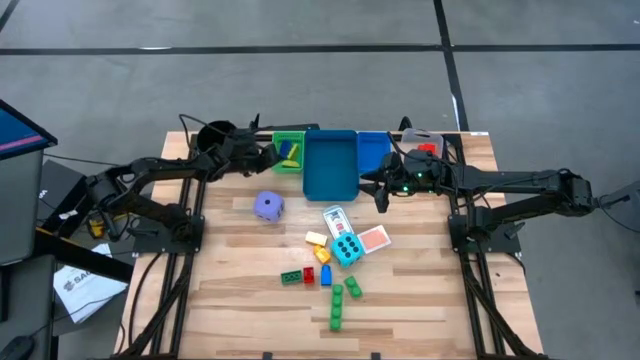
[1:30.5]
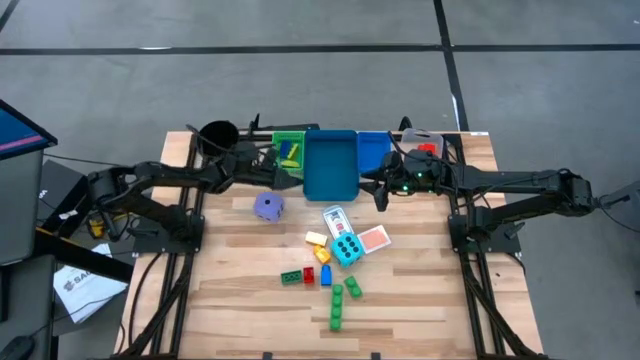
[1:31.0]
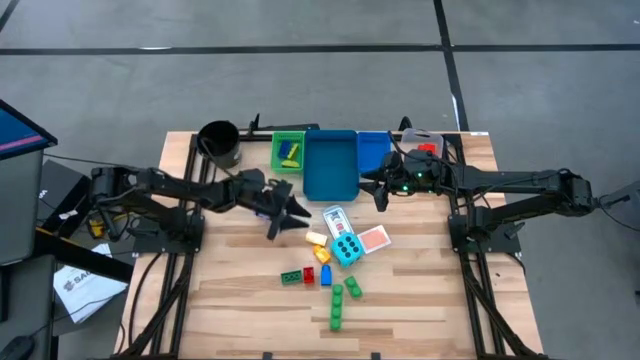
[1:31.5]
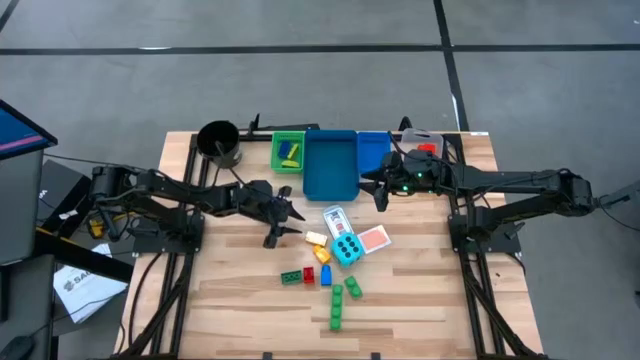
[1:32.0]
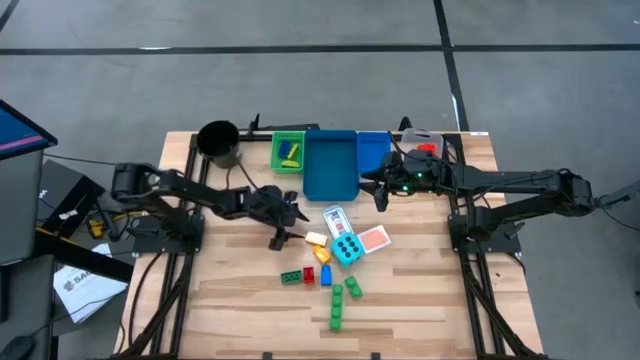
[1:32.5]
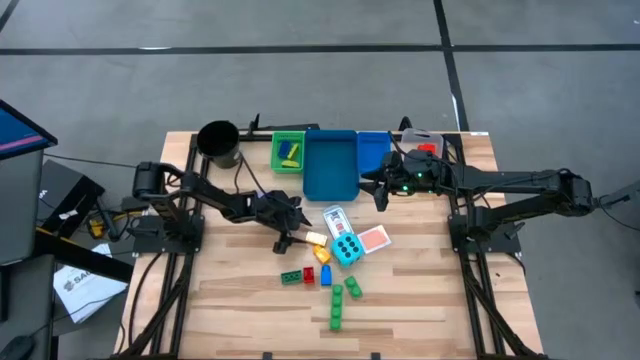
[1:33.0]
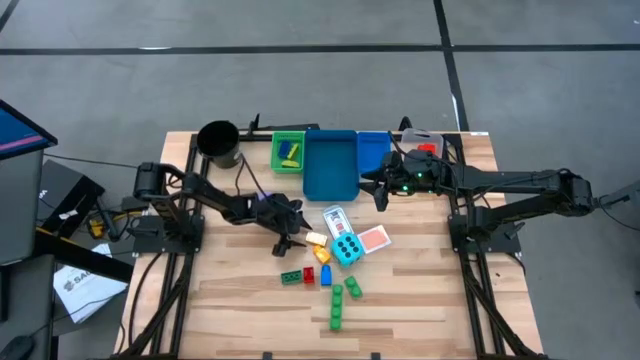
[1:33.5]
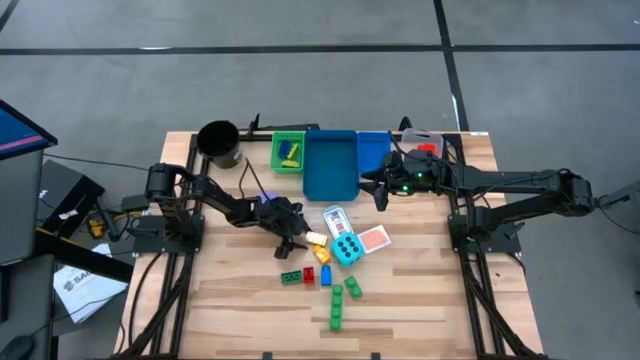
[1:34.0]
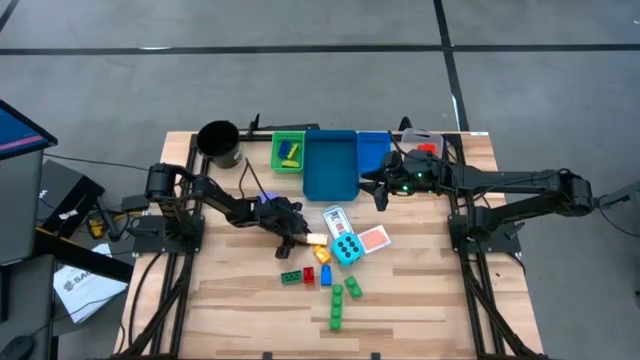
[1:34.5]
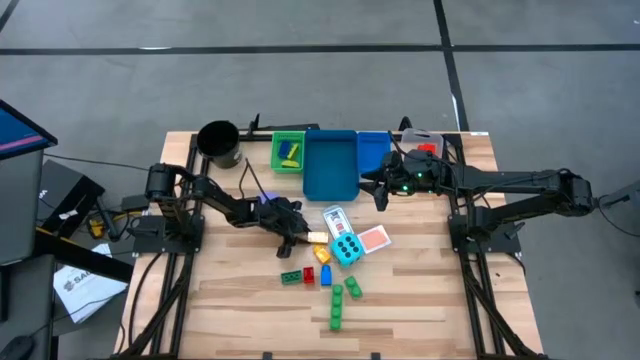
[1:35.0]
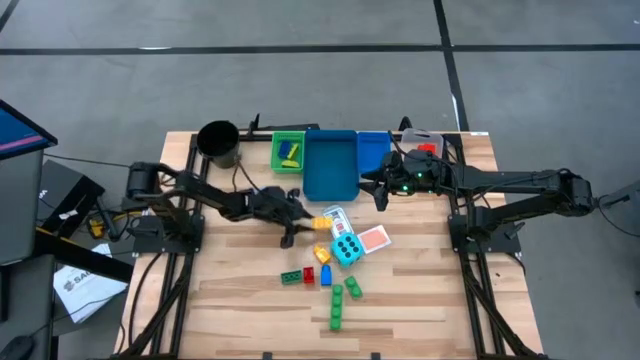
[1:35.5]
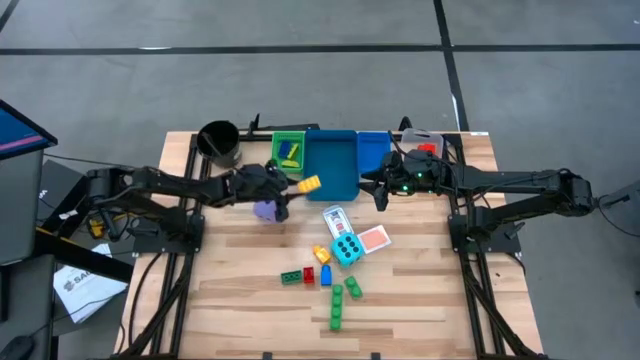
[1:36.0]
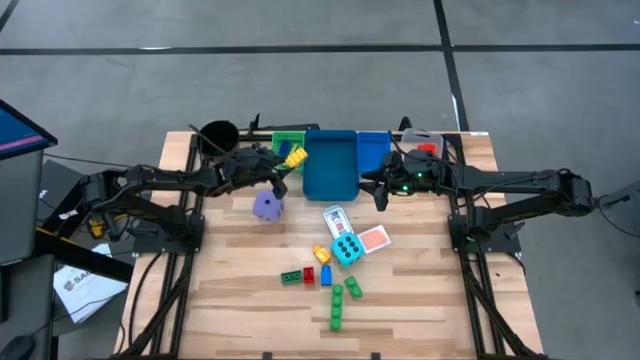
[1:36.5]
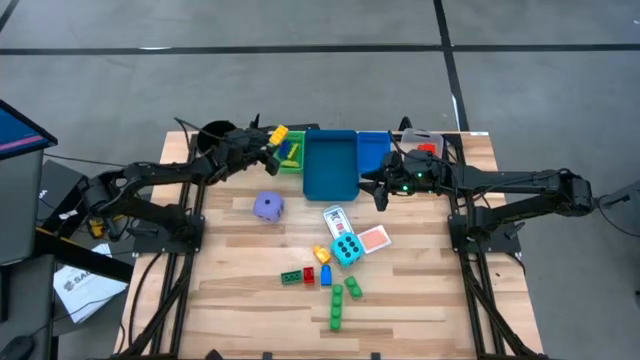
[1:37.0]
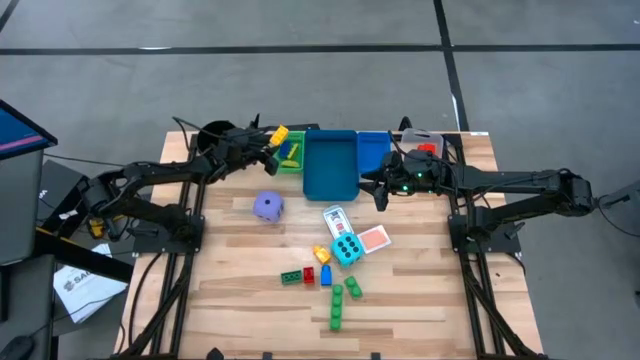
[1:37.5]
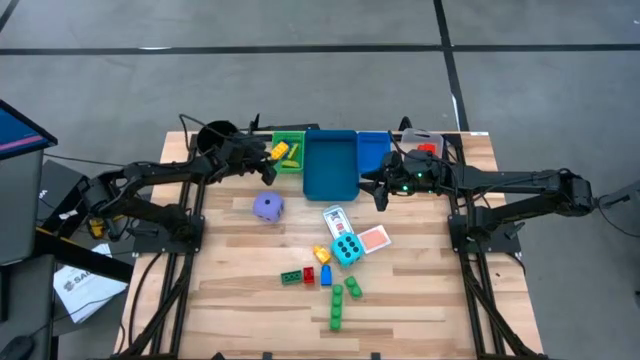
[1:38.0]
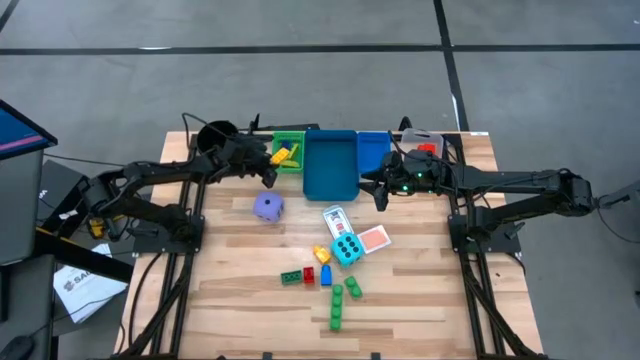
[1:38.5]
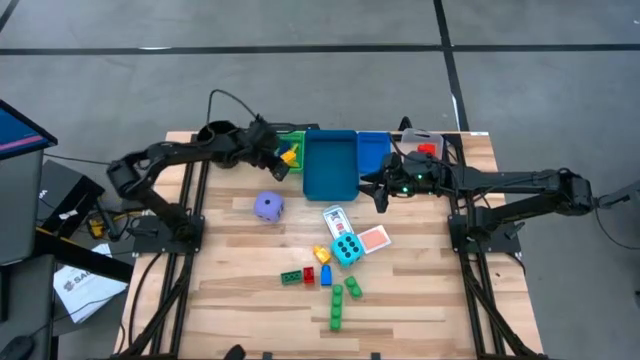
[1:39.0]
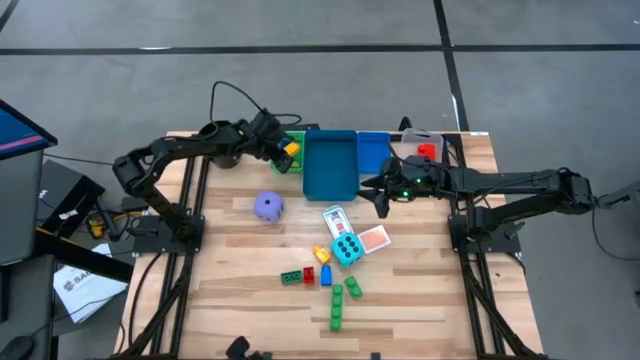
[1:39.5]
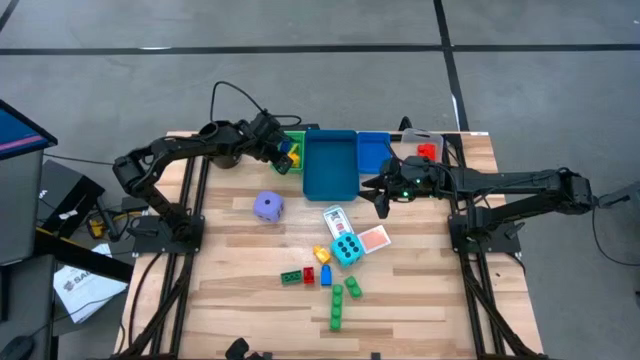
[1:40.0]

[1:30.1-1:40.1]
Task: Pick & Place Toys
Put the small yellow game piece into the green bin

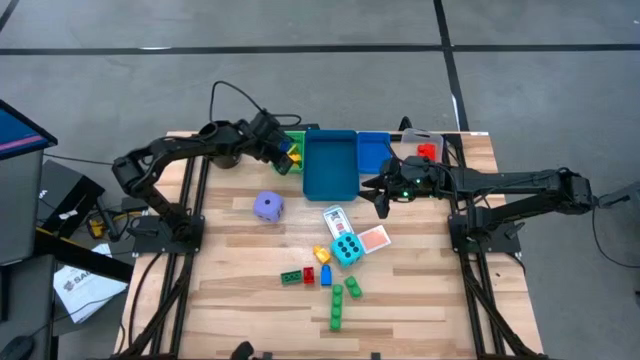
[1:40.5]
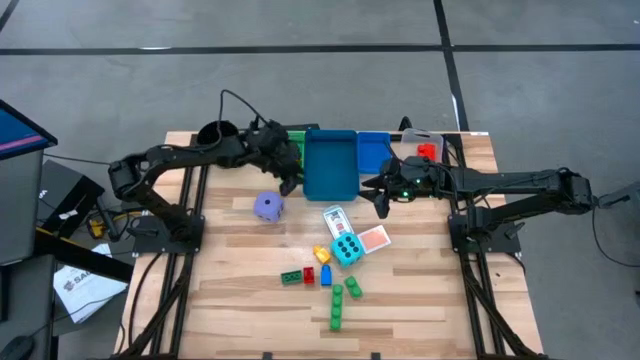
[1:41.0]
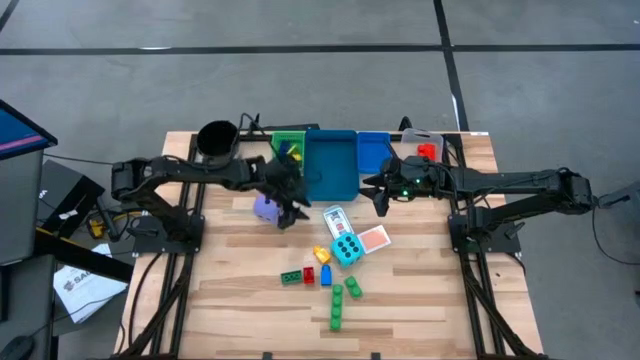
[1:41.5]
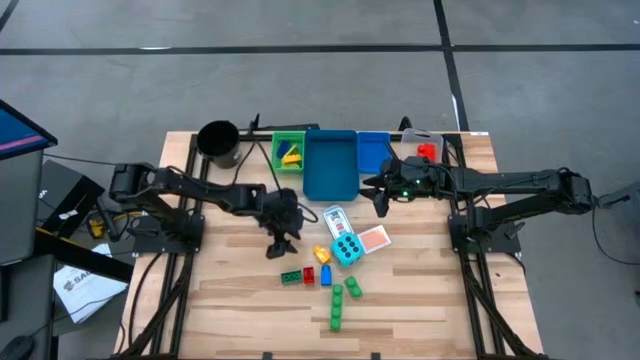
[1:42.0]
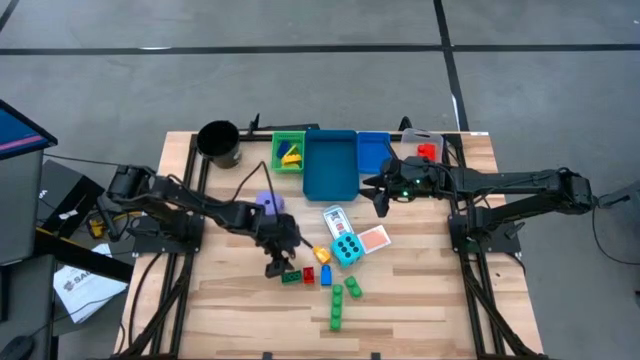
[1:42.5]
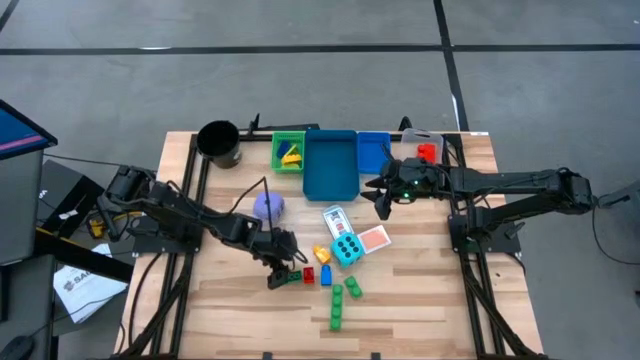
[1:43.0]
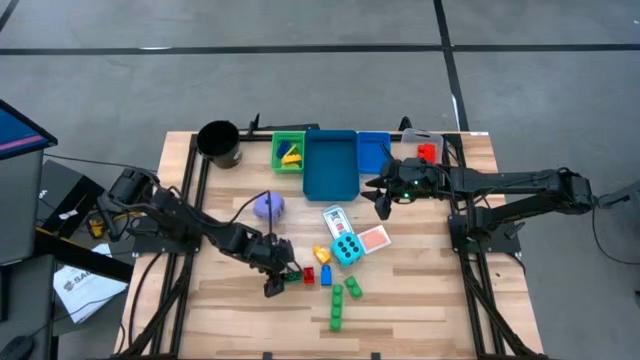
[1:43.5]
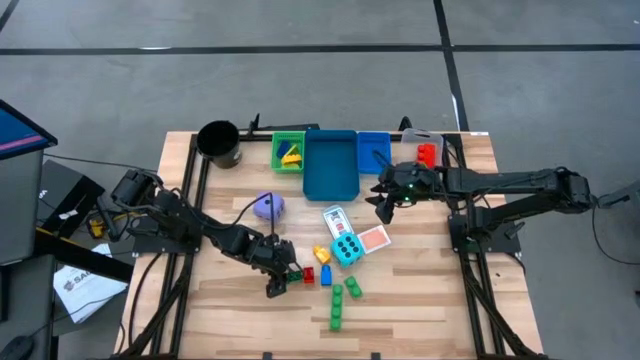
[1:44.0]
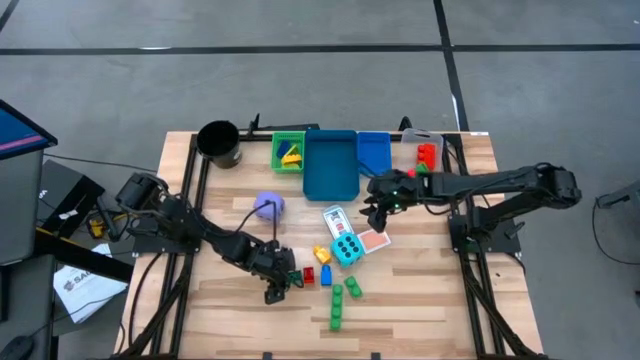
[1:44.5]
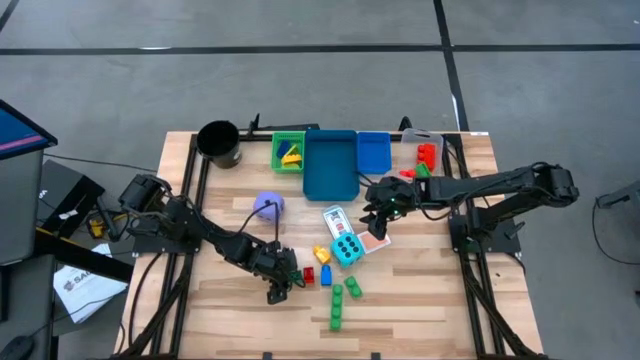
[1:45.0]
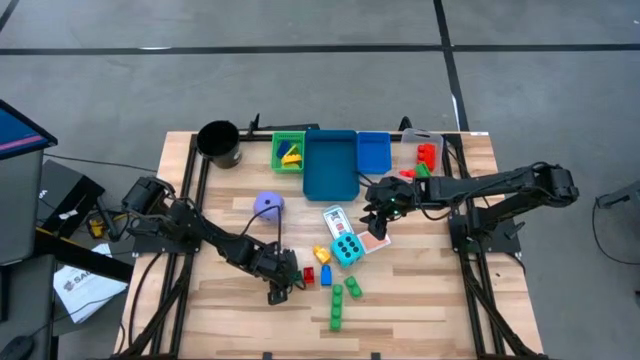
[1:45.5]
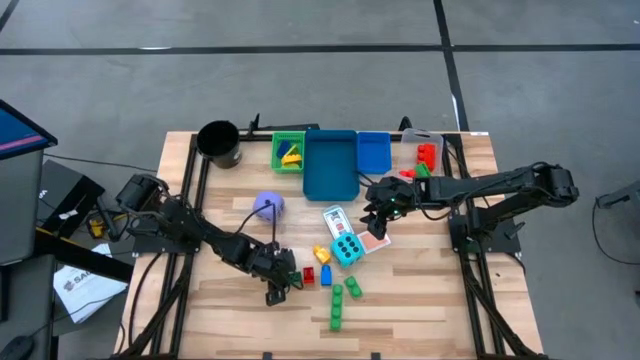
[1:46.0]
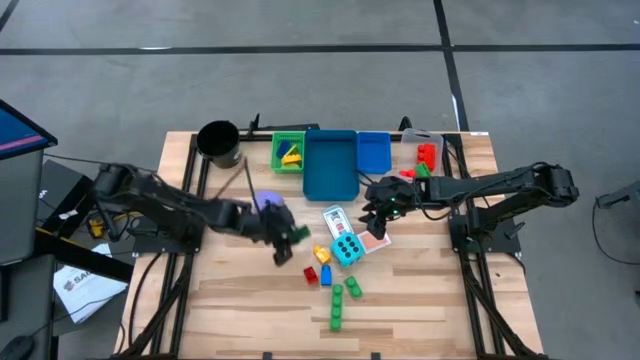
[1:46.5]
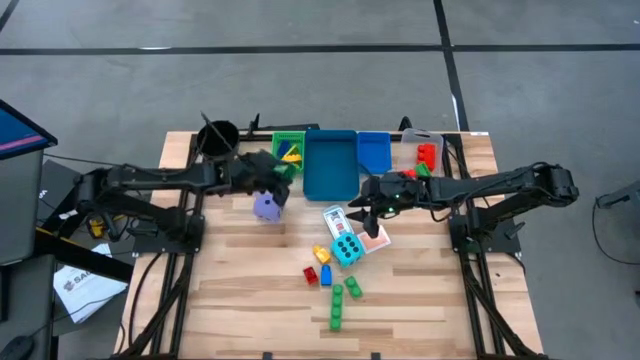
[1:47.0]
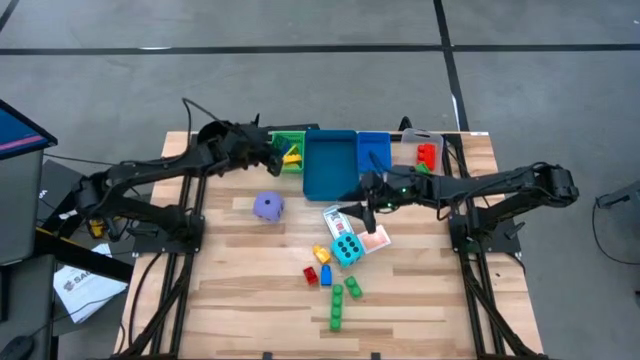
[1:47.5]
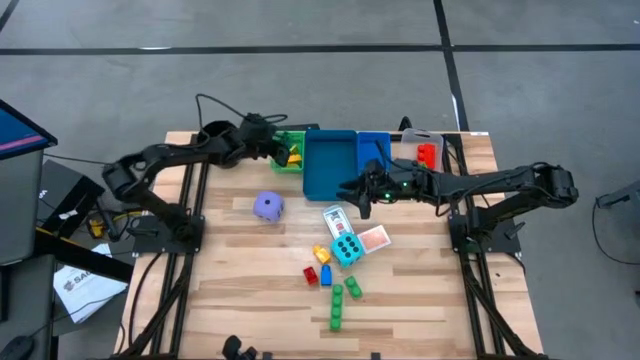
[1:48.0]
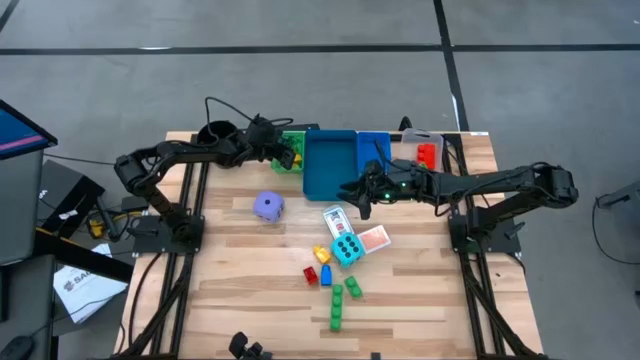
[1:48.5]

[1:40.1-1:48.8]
Put the small green game piece into the green bin

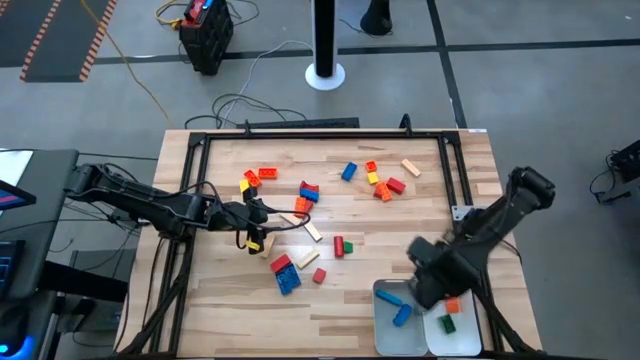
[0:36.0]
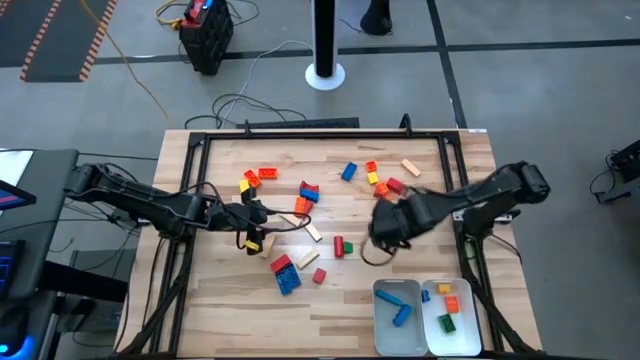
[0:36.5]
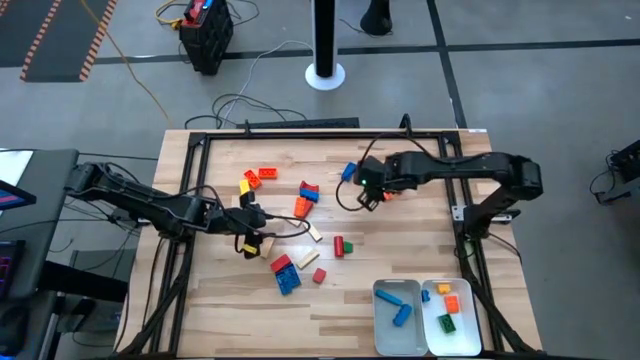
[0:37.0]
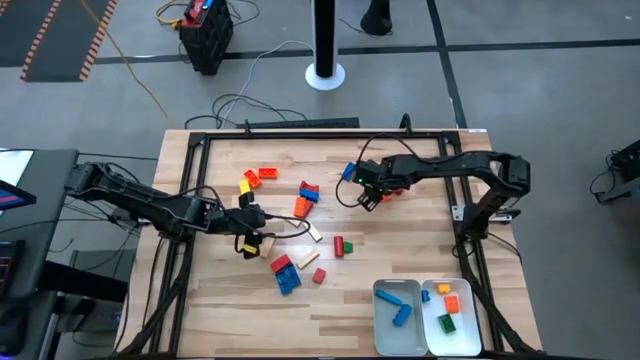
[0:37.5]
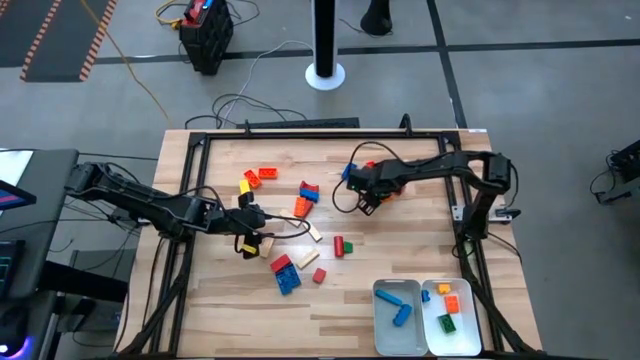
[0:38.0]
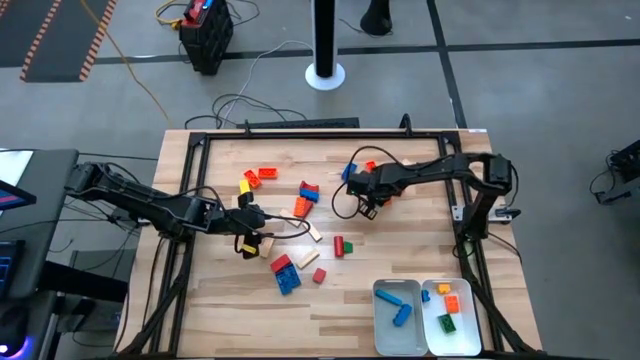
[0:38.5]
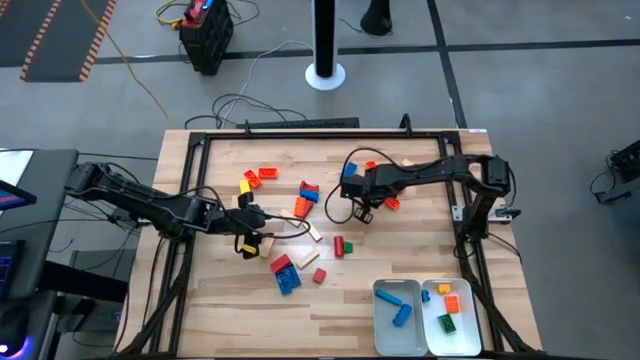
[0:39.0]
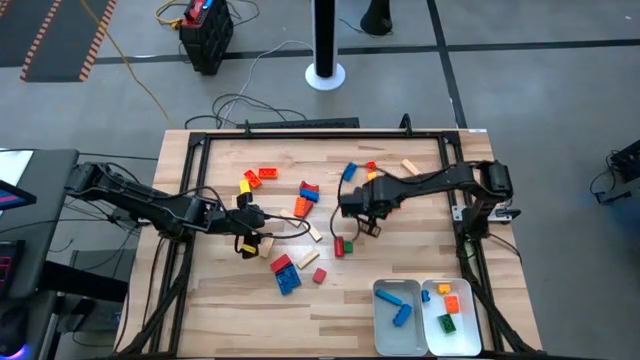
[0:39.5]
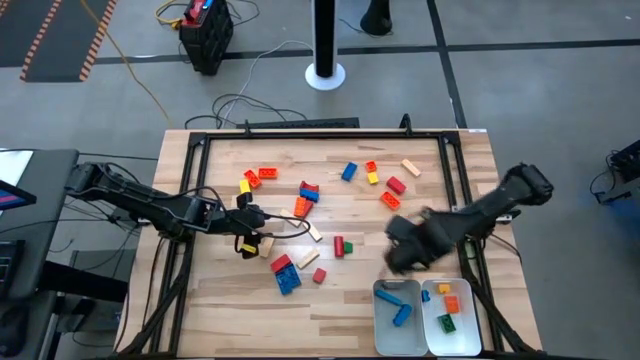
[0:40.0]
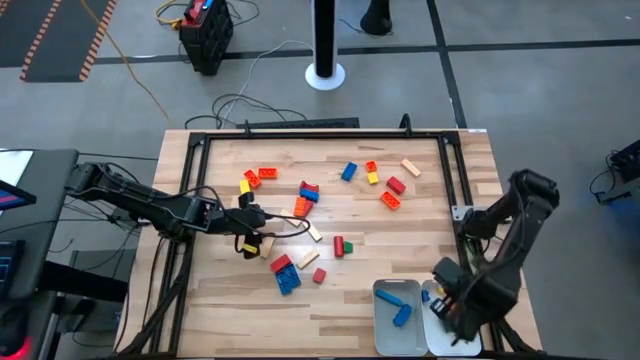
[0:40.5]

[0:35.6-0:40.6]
Task: Sort blocks by size
Put the small red wooden block into the white bin
